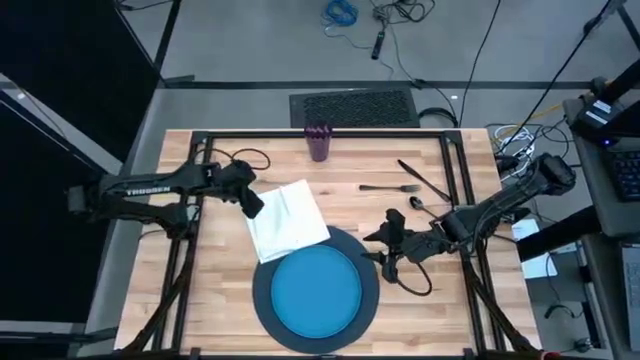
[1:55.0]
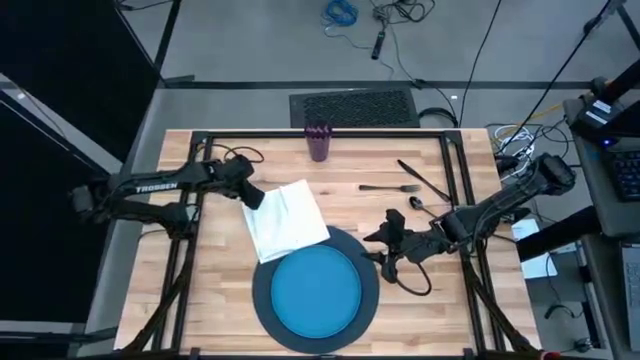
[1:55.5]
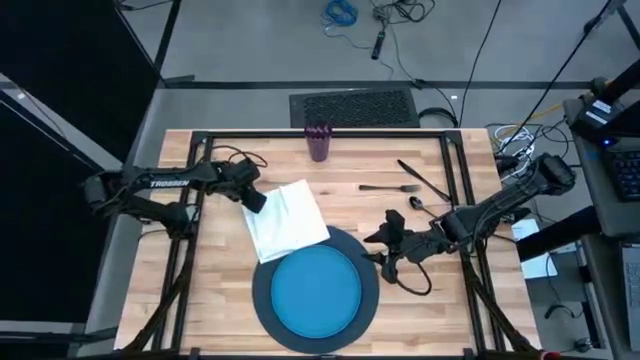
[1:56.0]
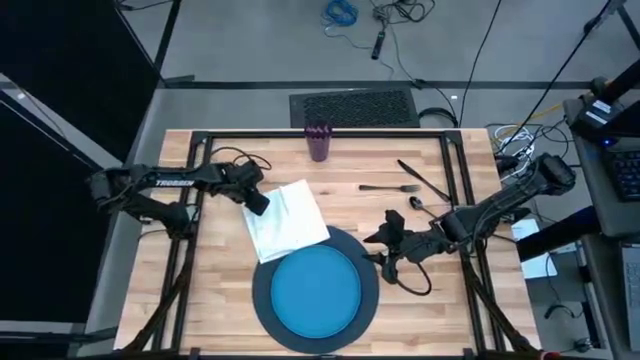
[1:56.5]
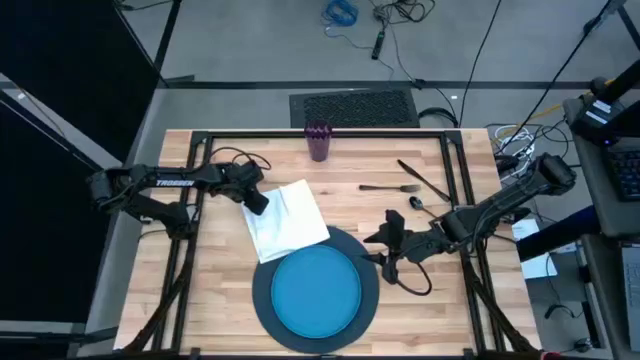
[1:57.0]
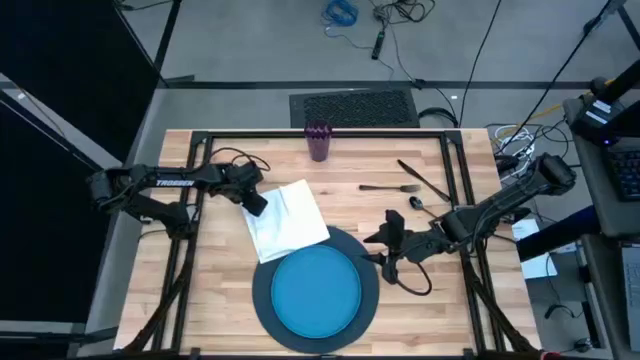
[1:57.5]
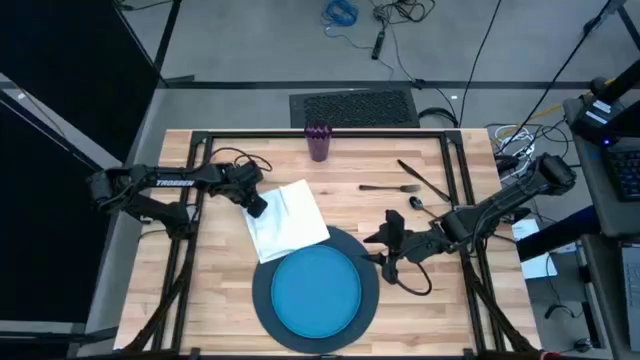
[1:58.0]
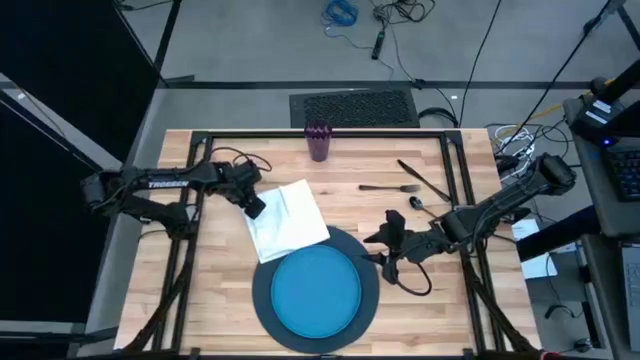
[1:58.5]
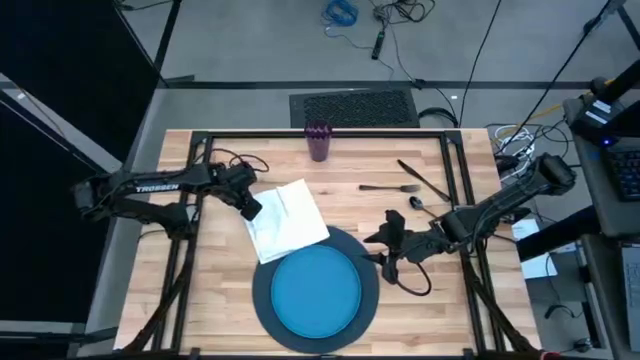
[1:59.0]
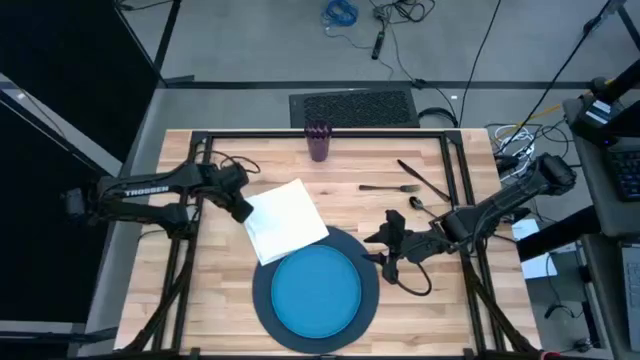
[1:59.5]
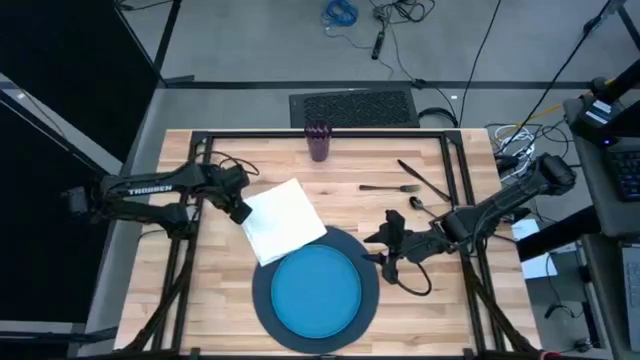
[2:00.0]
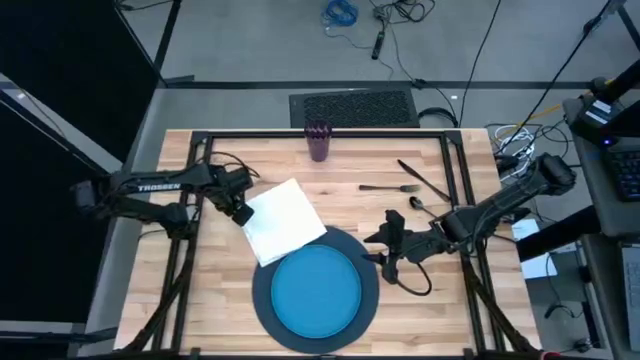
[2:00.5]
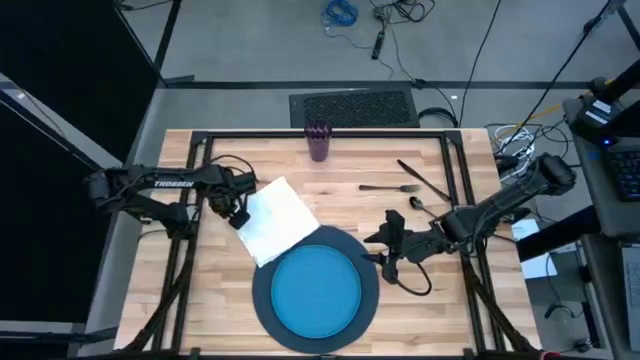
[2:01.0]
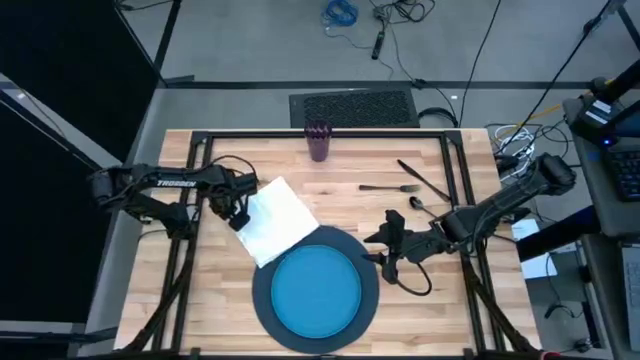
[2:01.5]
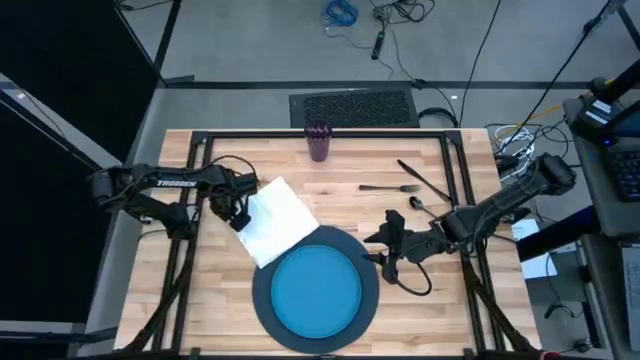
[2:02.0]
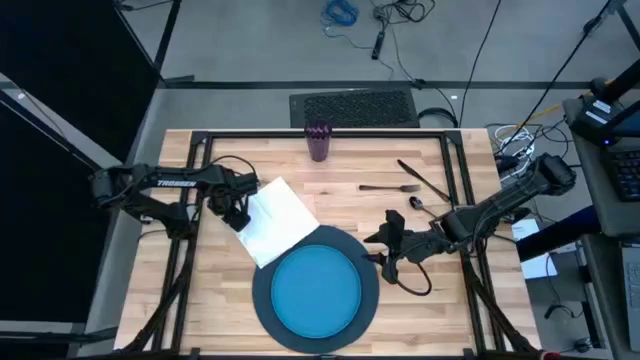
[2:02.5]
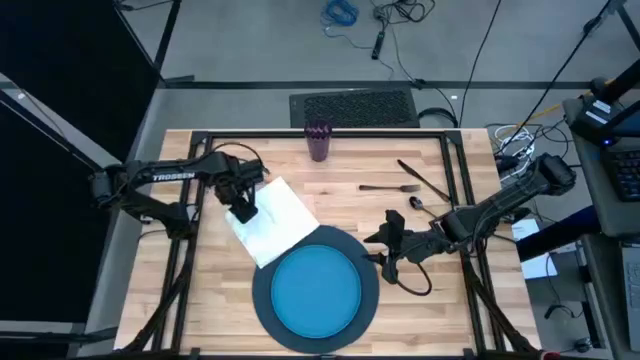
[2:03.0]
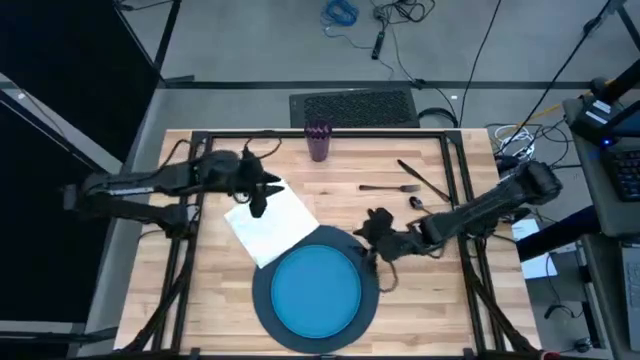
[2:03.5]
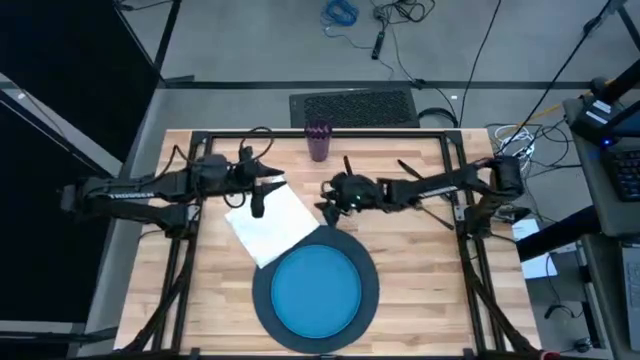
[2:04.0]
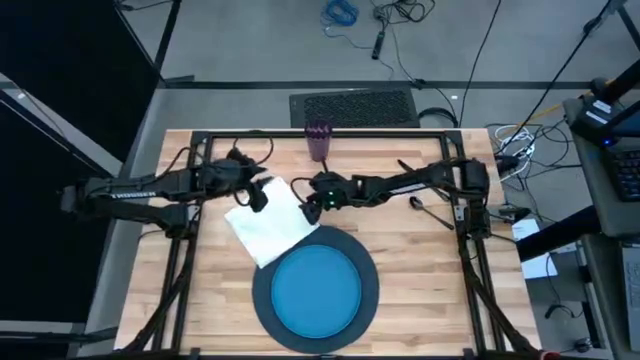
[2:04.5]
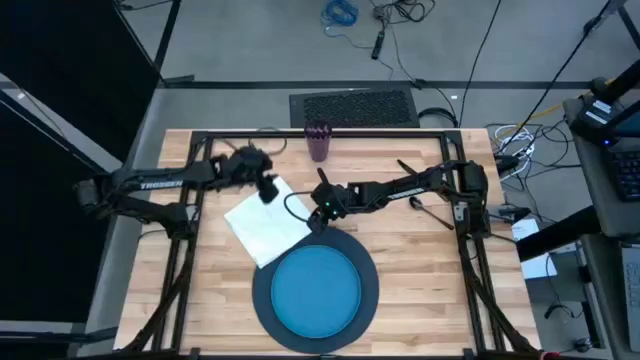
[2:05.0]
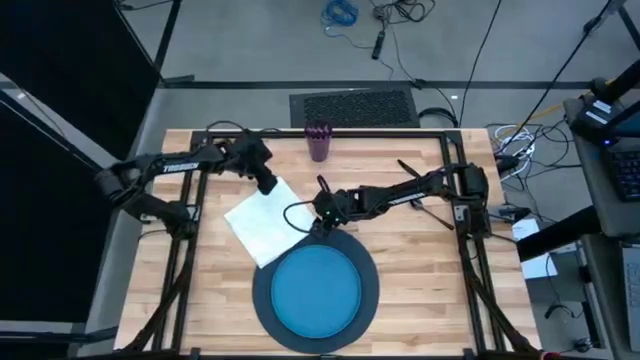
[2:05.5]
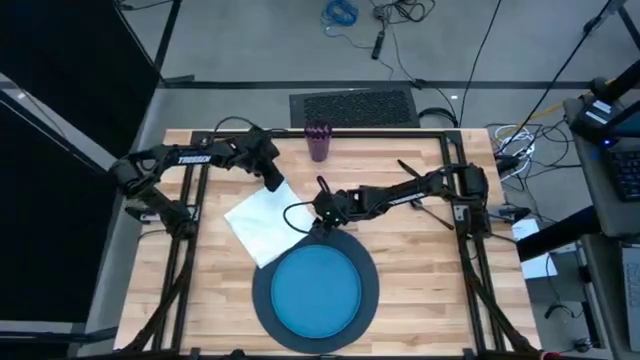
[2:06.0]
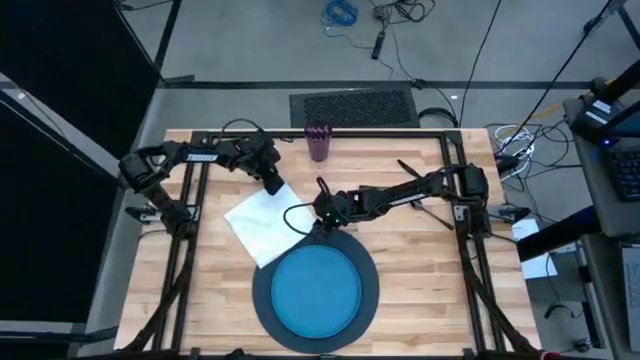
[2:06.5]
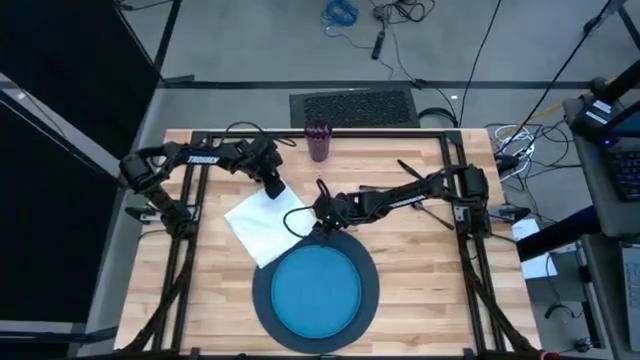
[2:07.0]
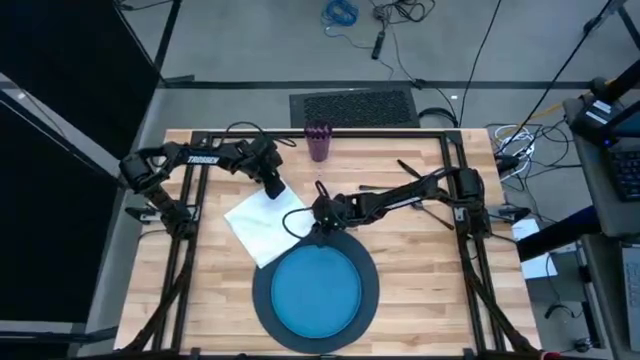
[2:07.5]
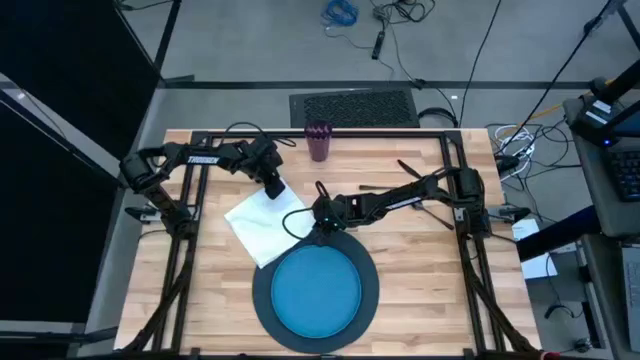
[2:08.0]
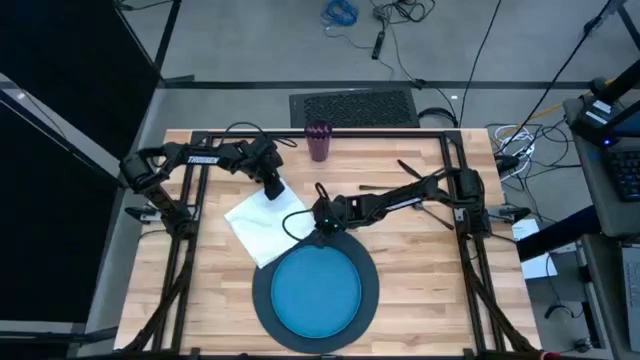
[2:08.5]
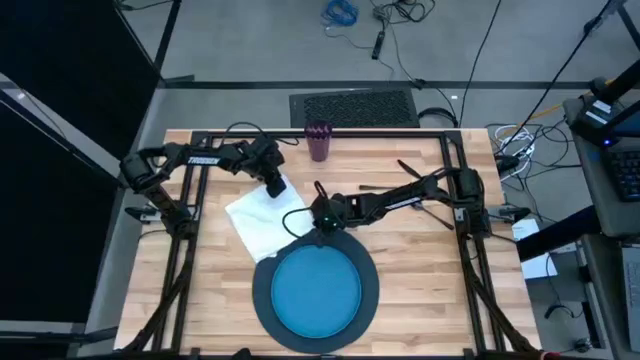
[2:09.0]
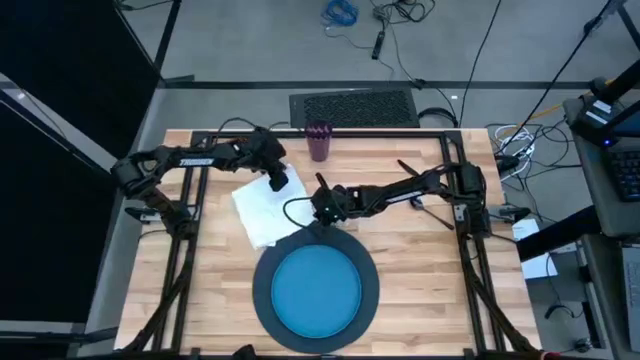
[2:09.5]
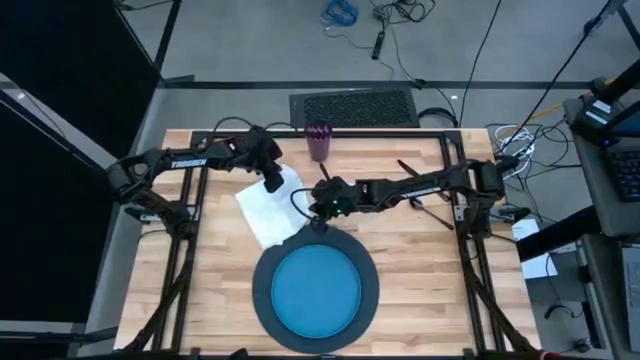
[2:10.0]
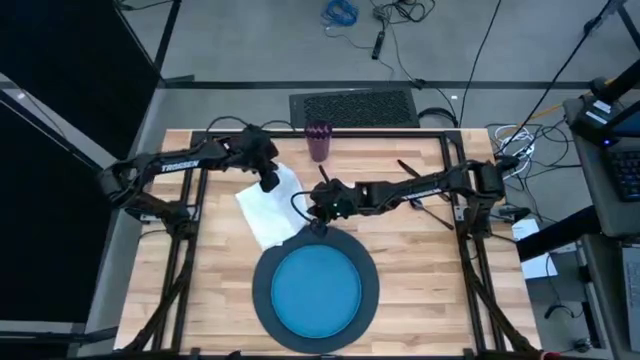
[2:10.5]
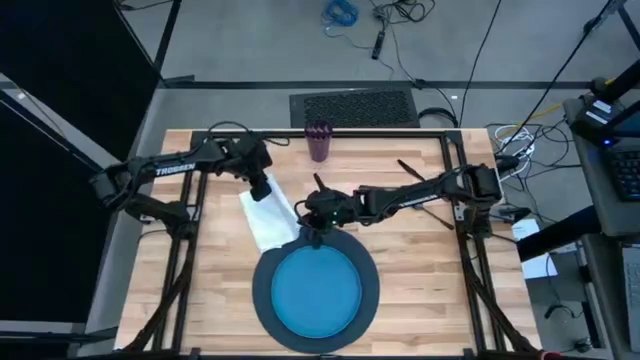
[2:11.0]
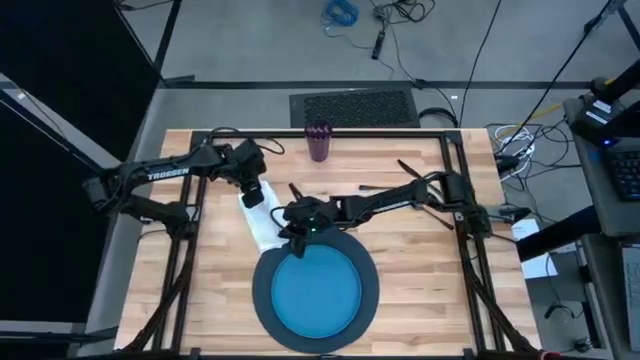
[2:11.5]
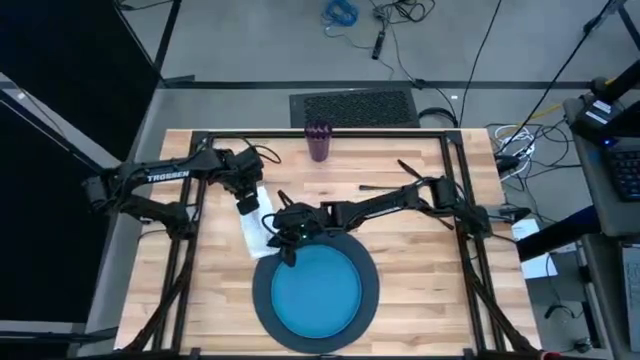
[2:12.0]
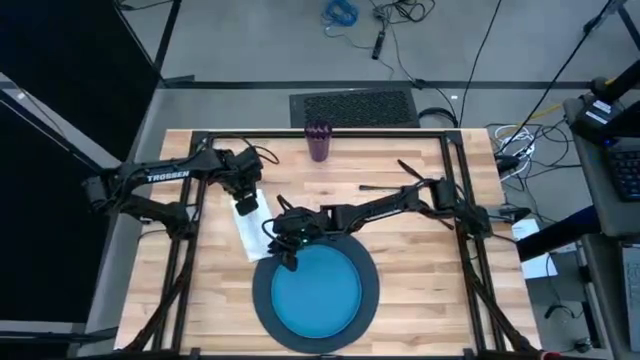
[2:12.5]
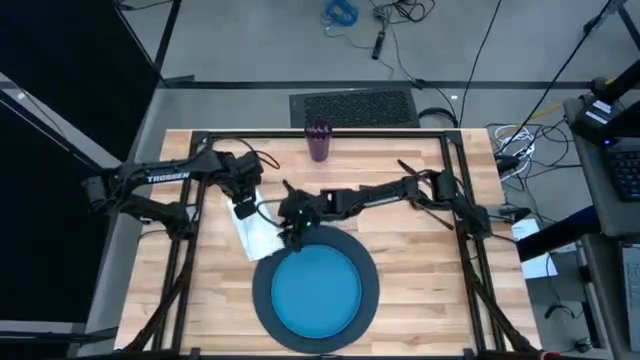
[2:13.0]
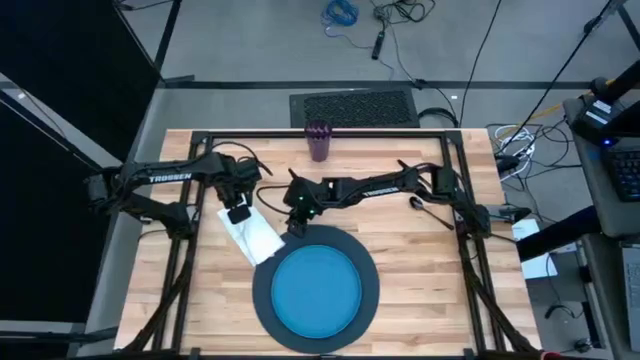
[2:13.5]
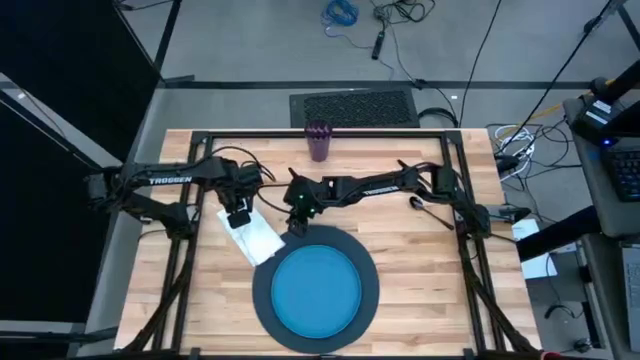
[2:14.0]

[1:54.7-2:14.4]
Task: Set table place
Fold the white table napkin on the table
